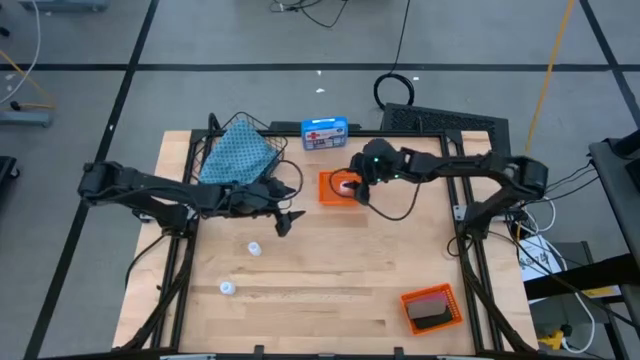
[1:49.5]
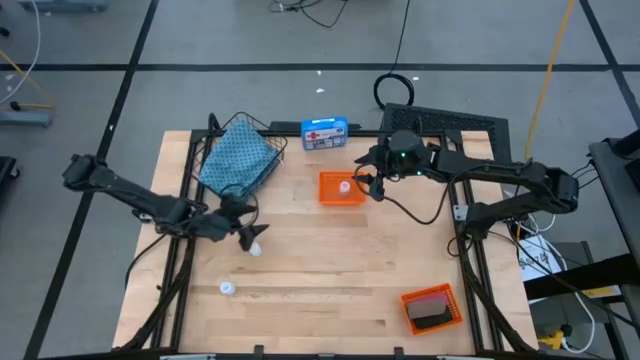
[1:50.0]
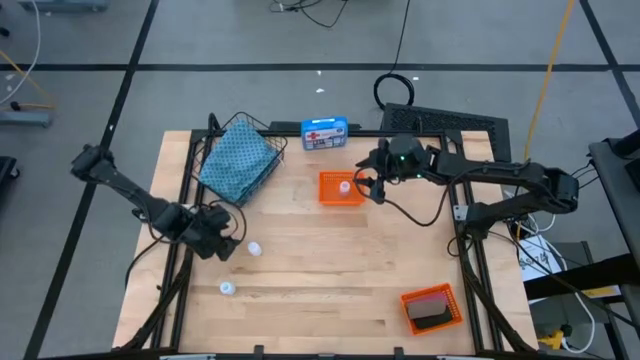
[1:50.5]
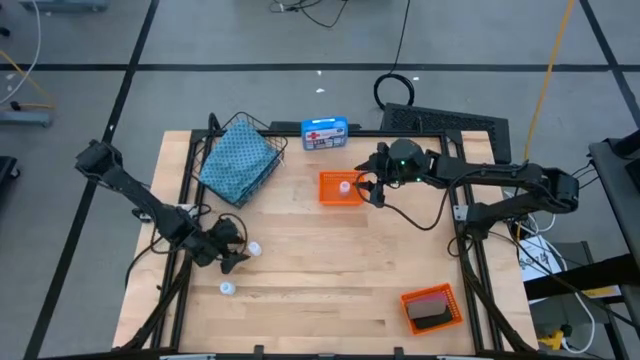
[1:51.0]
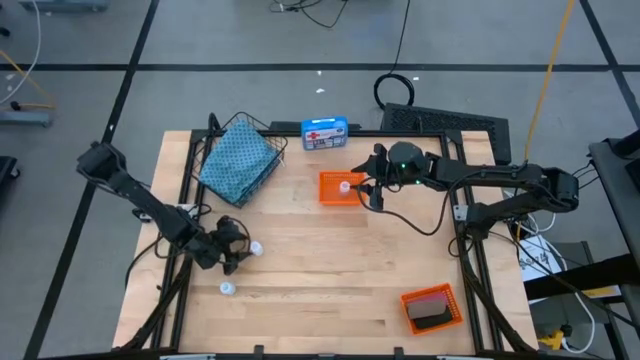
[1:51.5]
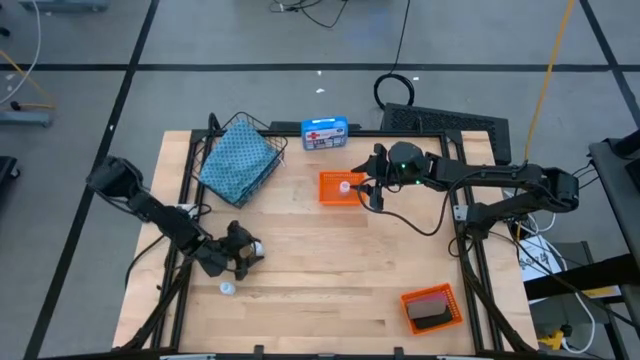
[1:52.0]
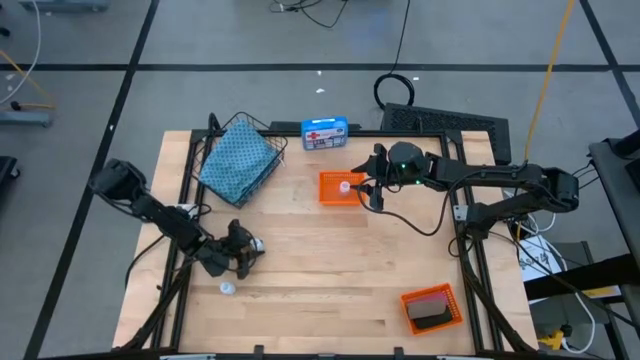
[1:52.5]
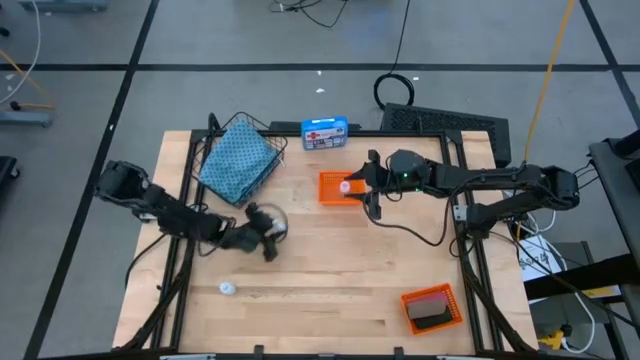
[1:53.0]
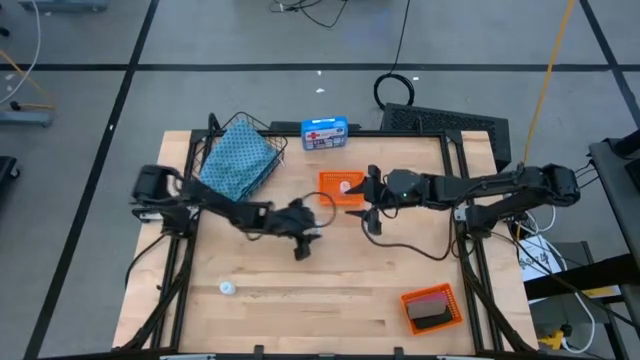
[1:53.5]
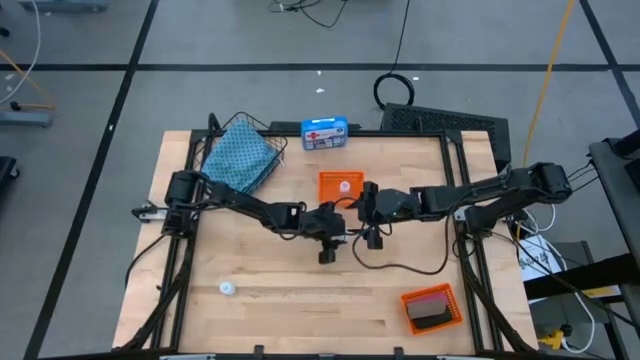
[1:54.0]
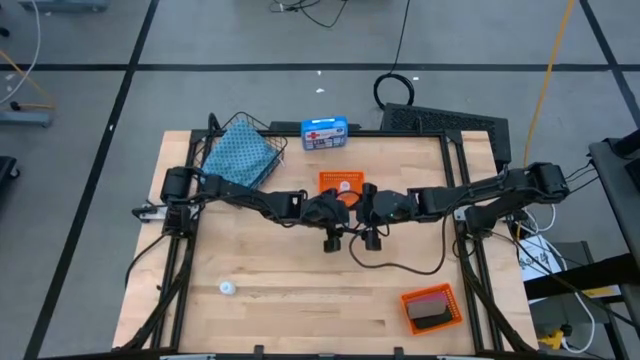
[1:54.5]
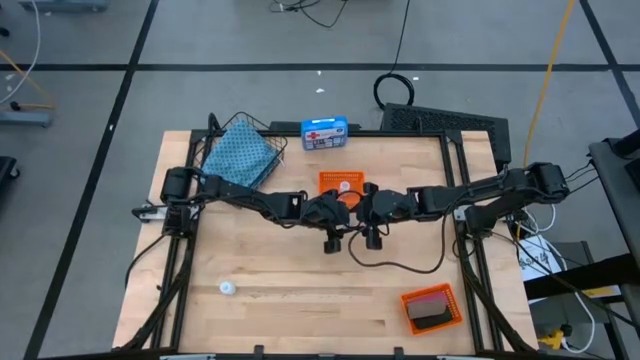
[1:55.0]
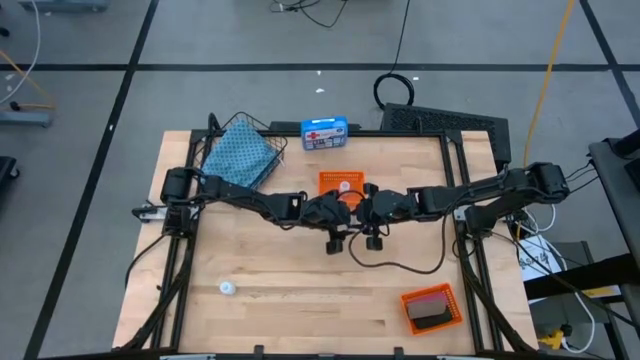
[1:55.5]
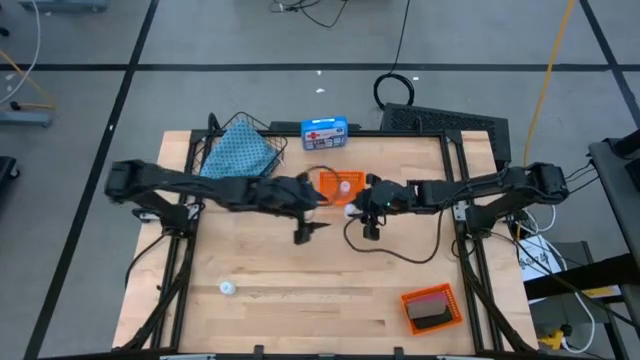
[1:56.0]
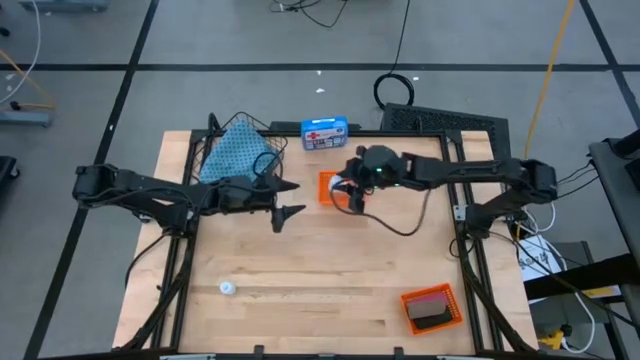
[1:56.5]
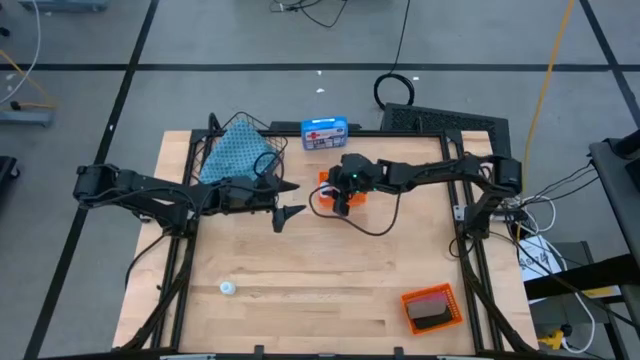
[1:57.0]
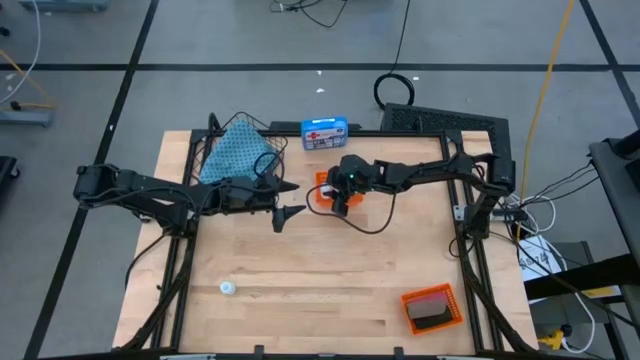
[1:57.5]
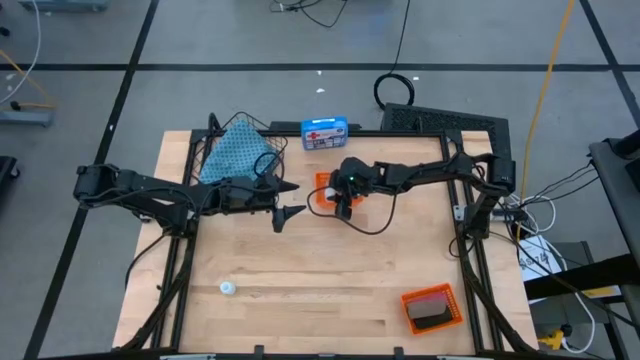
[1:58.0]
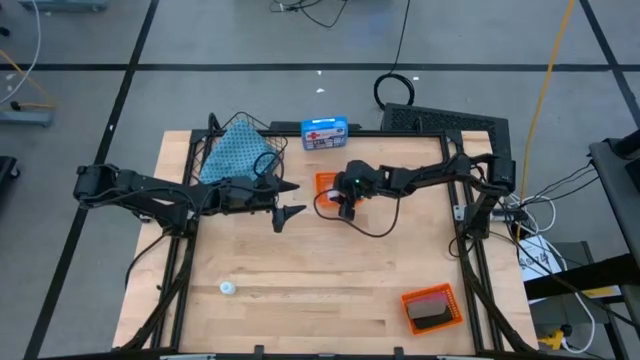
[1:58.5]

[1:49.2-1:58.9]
Task: Pick & place medical supplies in basket/bin
Put the top transparent pill bottle into the top orange bin

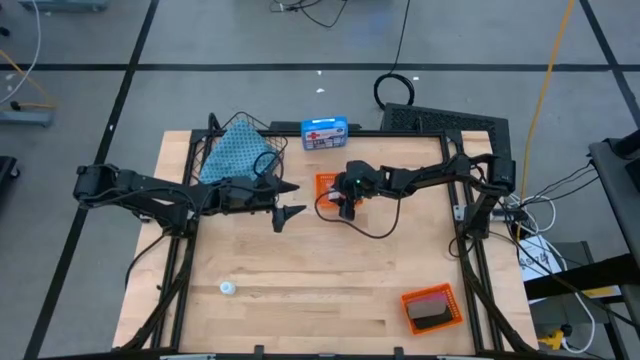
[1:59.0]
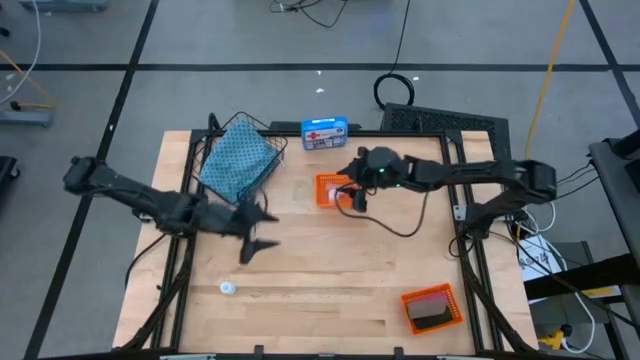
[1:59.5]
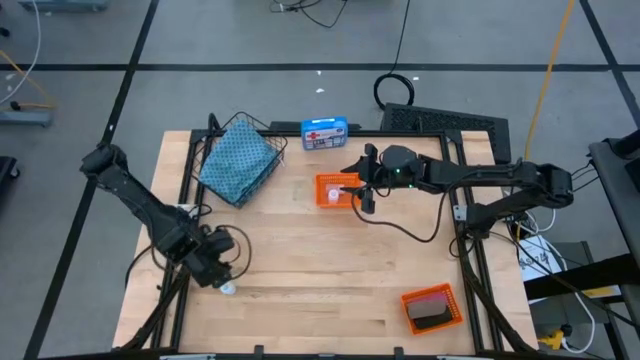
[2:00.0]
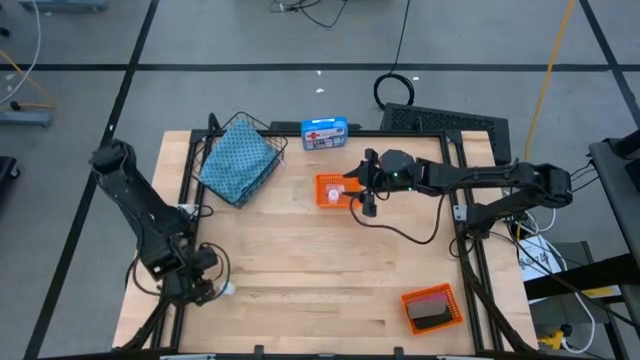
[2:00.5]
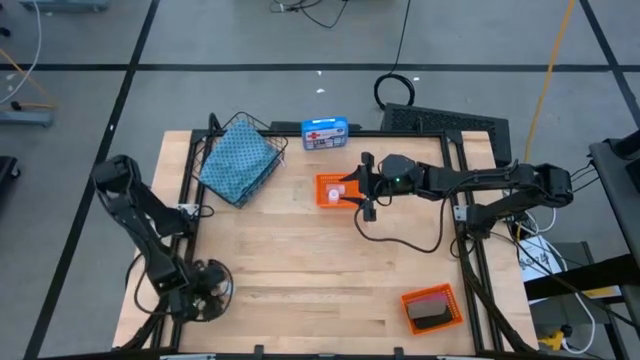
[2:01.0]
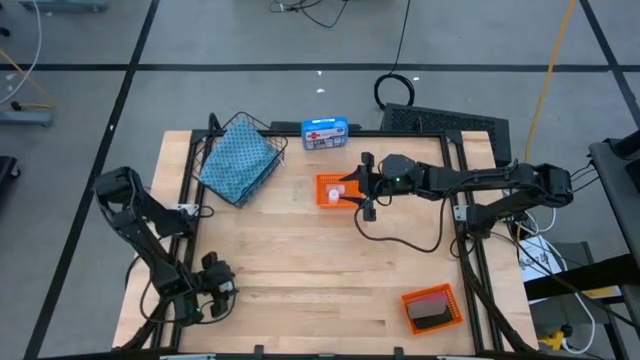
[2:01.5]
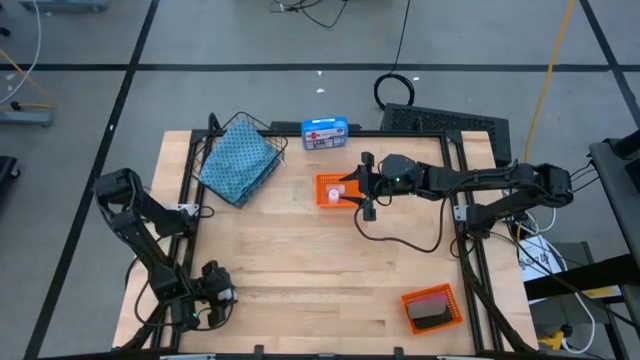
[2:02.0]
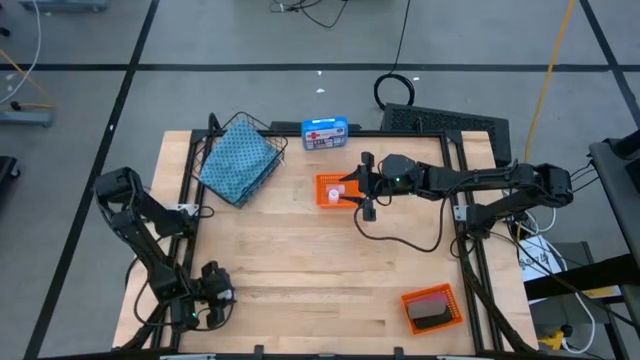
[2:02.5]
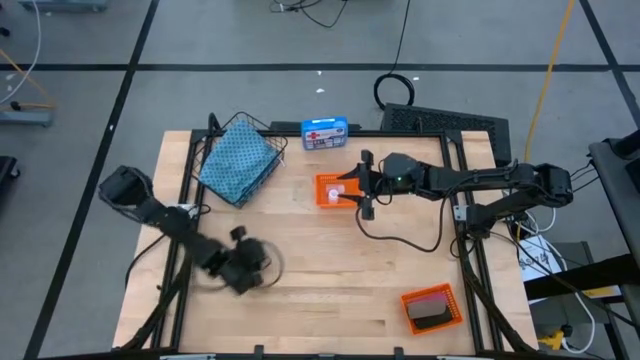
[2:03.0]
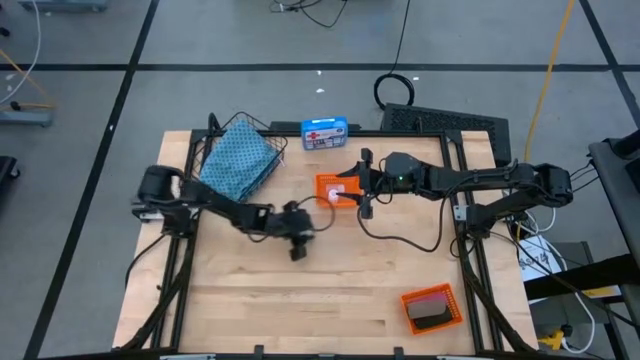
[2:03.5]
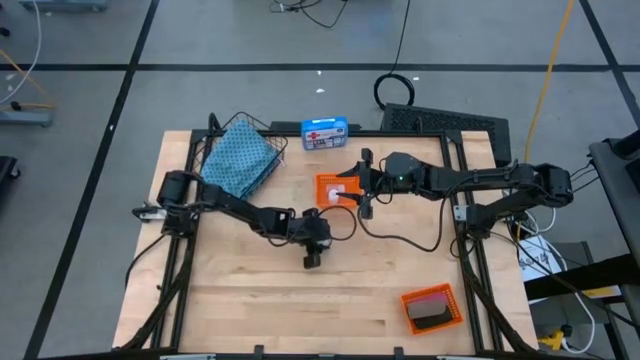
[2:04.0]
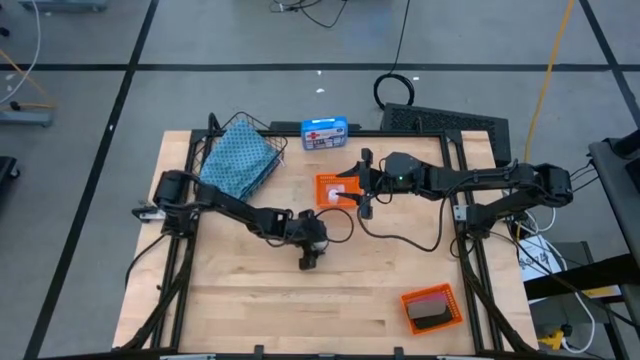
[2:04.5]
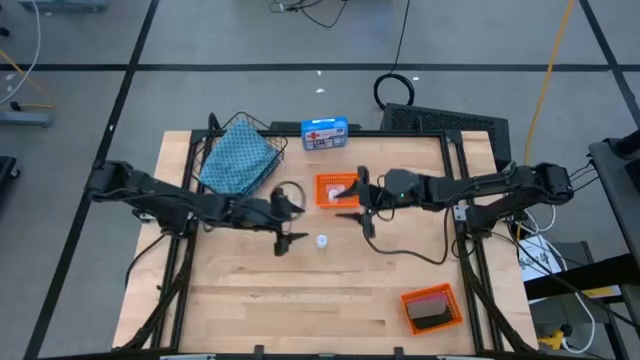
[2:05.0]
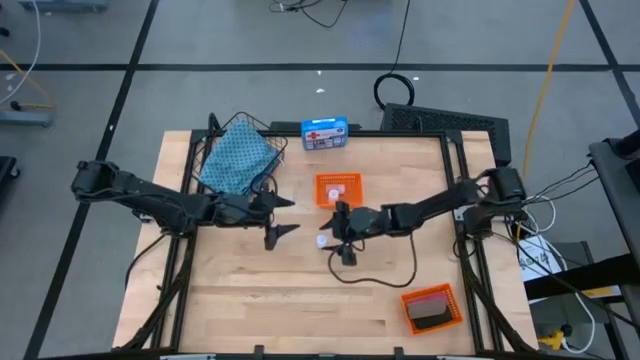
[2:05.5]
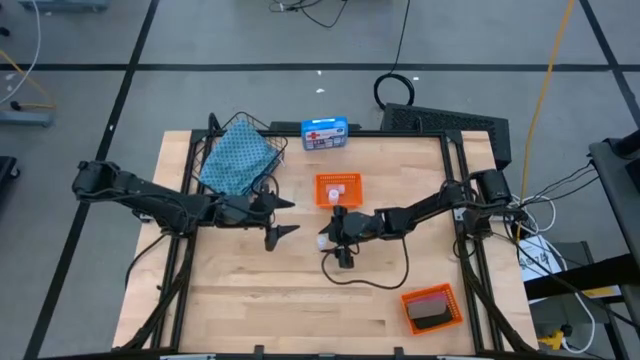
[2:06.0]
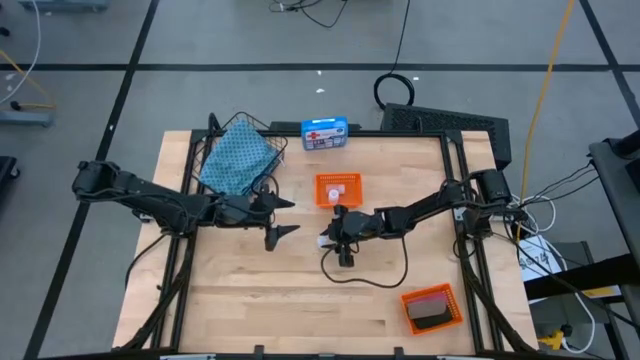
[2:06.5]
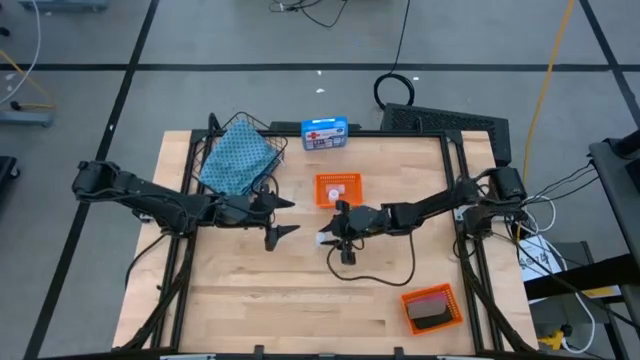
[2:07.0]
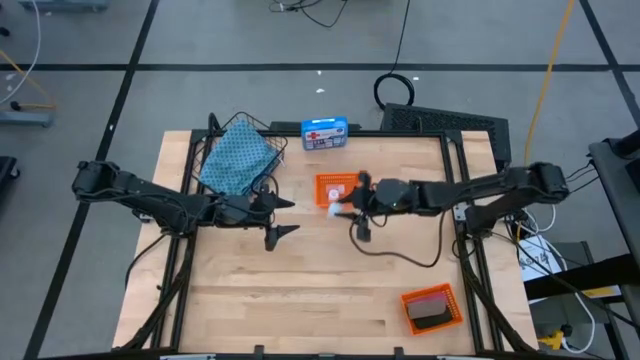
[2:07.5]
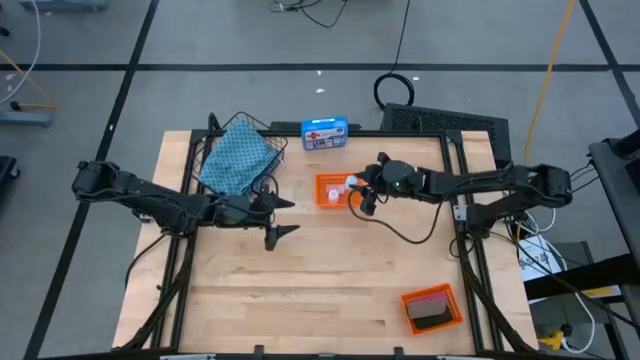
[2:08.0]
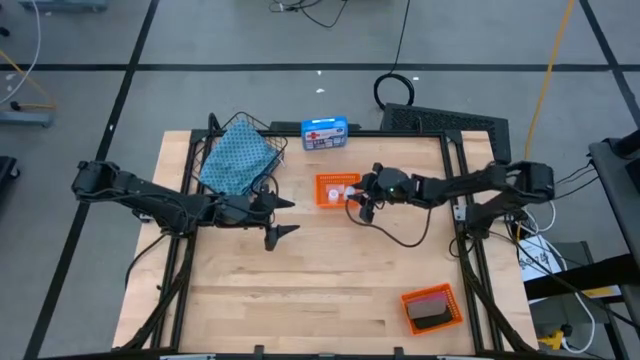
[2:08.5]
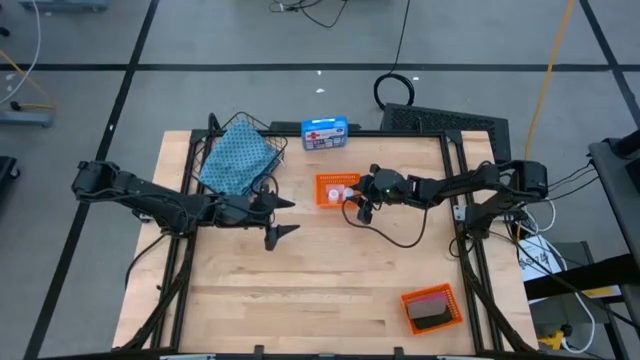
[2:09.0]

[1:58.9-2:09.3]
Put the transparent pill bottle into the top orange bin

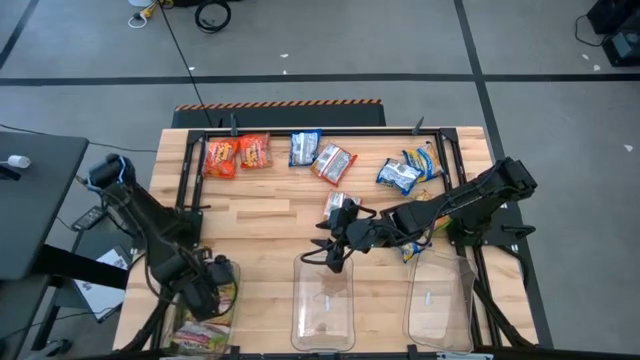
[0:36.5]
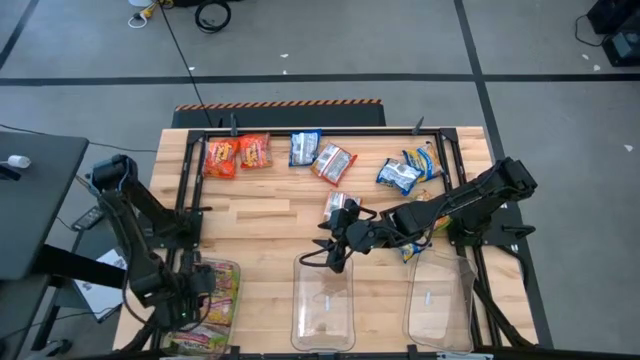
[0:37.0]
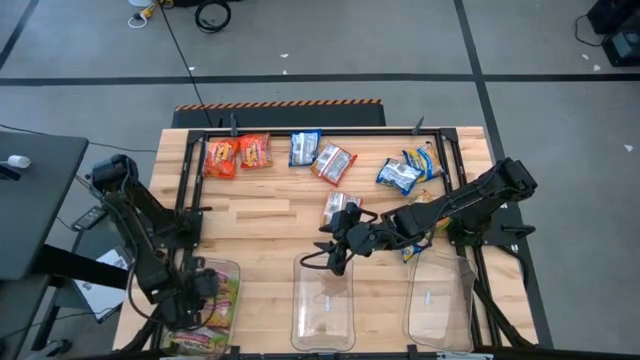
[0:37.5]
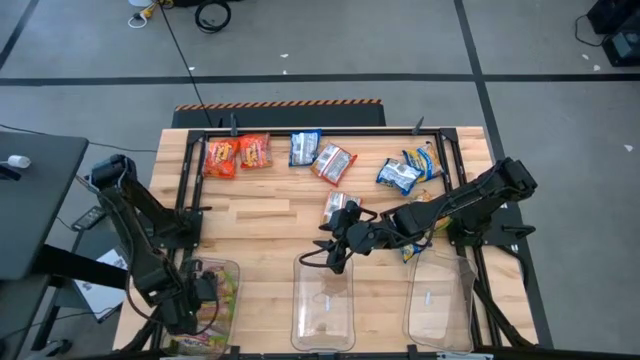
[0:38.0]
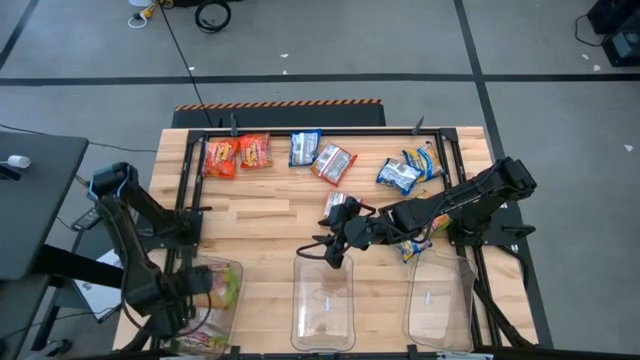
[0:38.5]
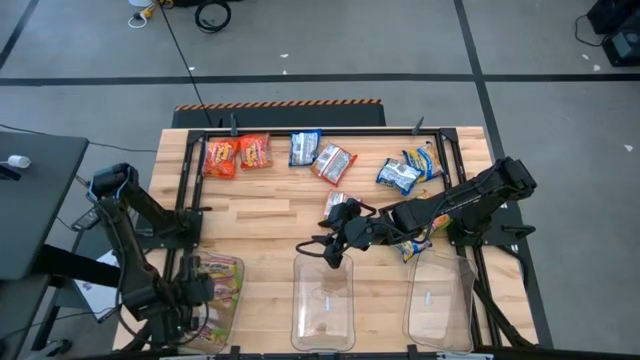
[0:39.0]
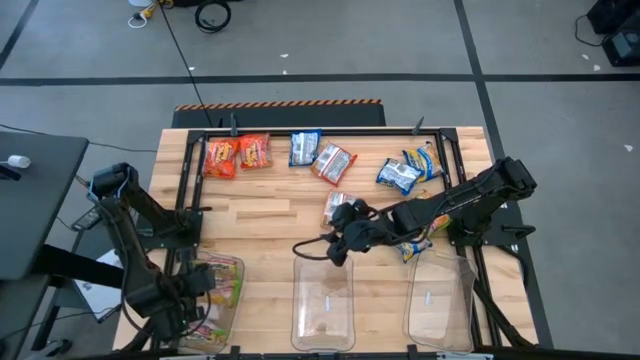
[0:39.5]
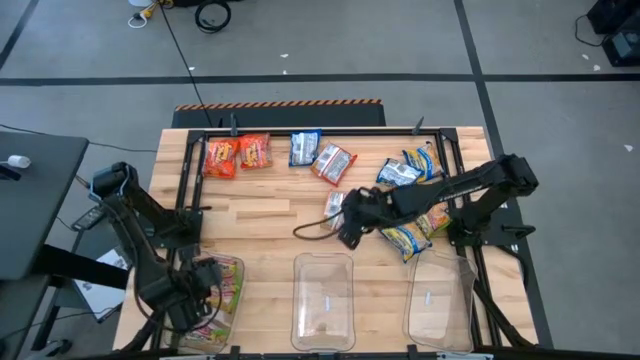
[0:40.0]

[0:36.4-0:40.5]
Task: Sort Maruchan noodles
Adjust the middle green noodle packs in the left transparent bin
